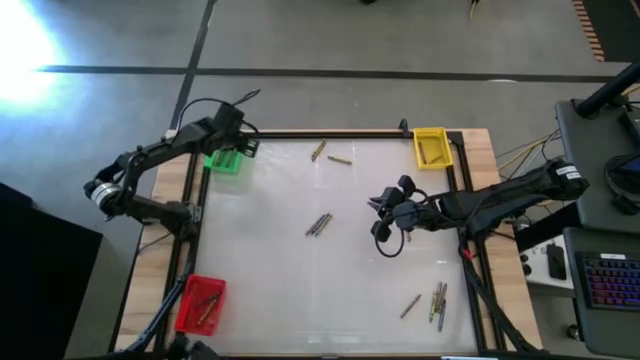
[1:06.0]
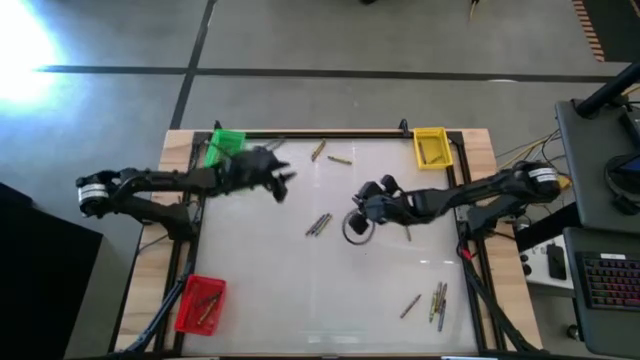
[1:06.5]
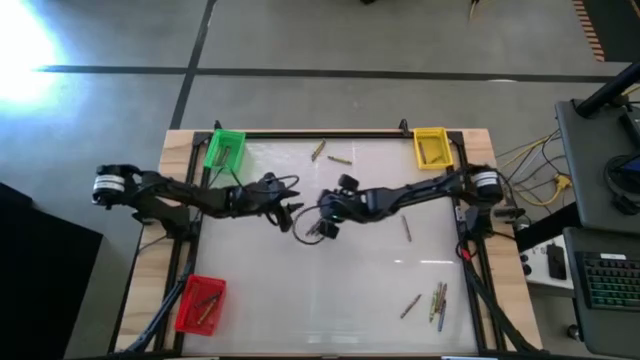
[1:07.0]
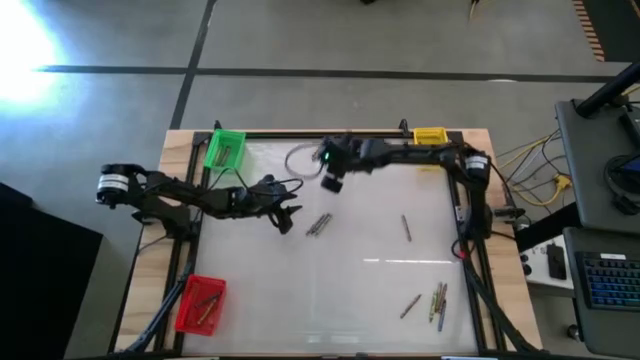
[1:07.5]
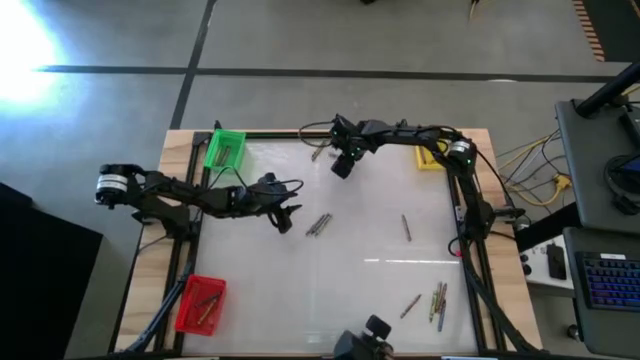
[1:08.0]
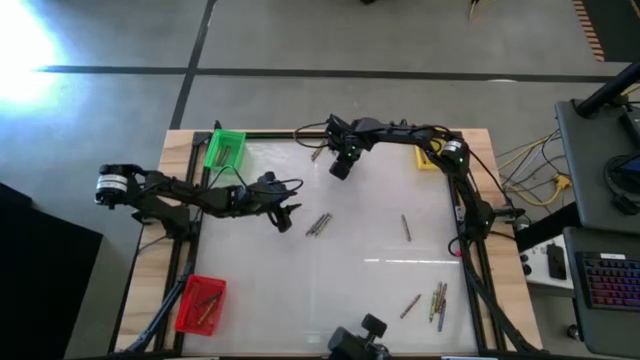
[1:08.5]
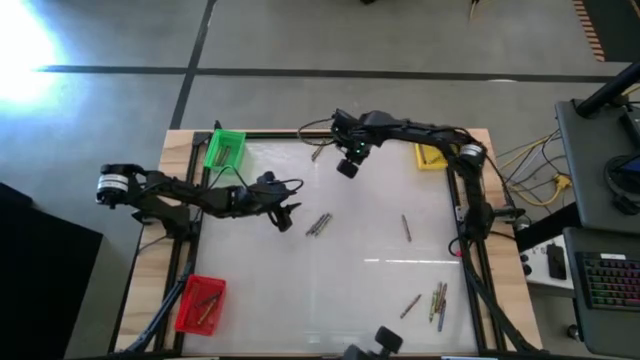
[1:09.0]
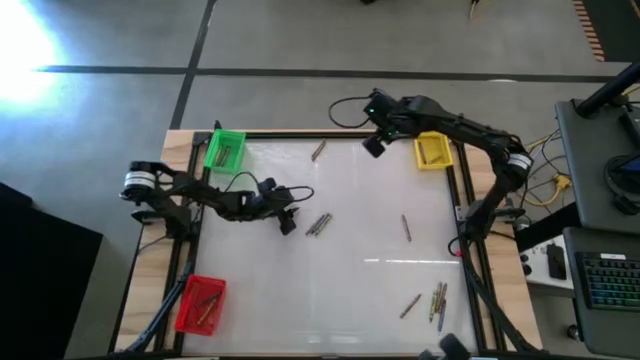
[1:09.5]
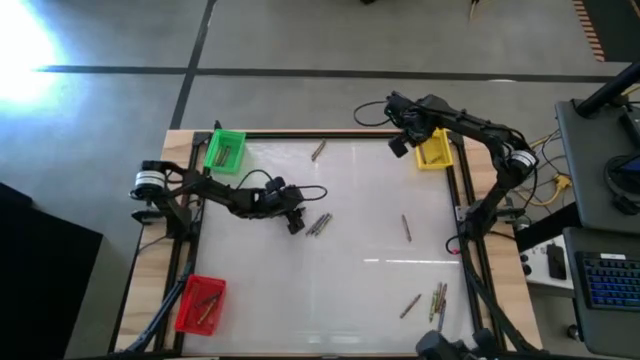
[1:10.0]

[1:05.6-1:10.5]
Task: Sort crayons
Put the green crayon into the yellow basket

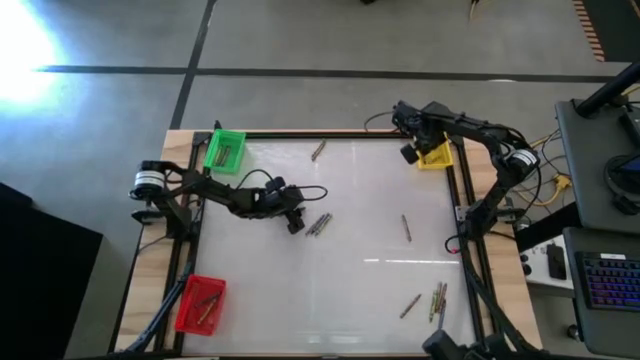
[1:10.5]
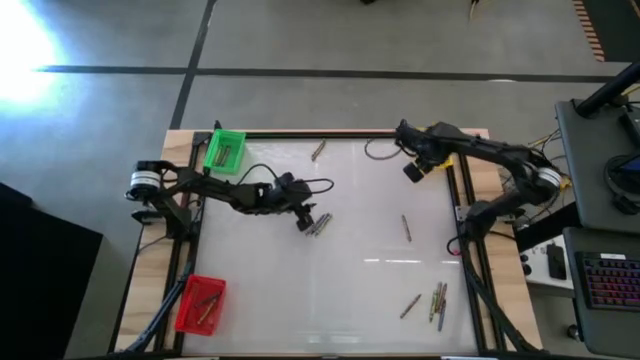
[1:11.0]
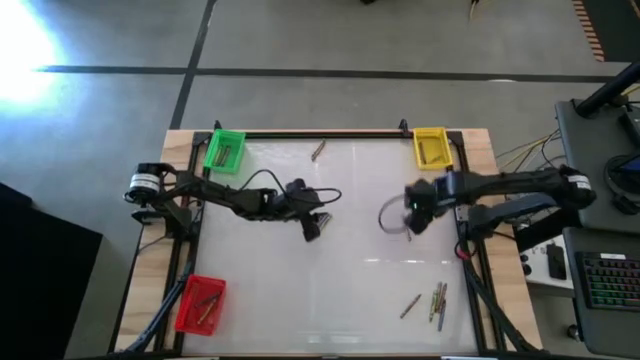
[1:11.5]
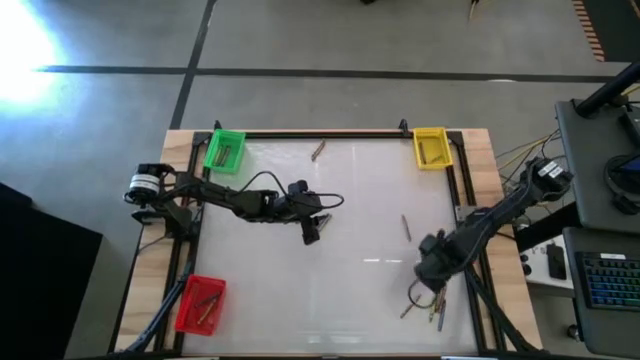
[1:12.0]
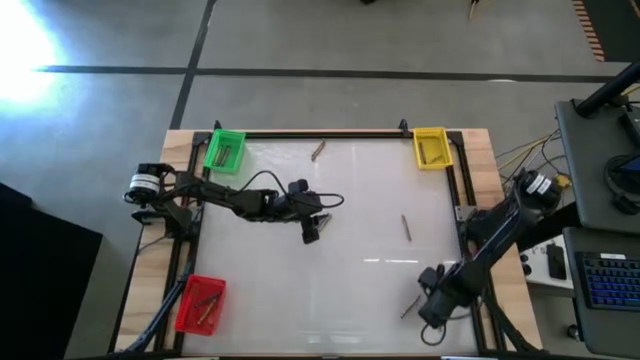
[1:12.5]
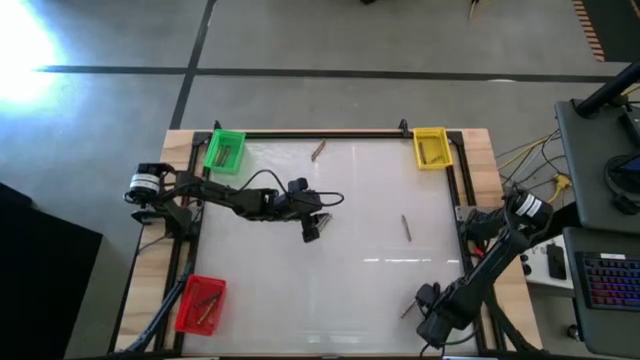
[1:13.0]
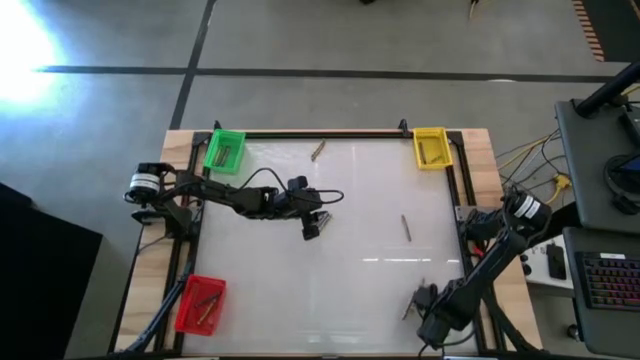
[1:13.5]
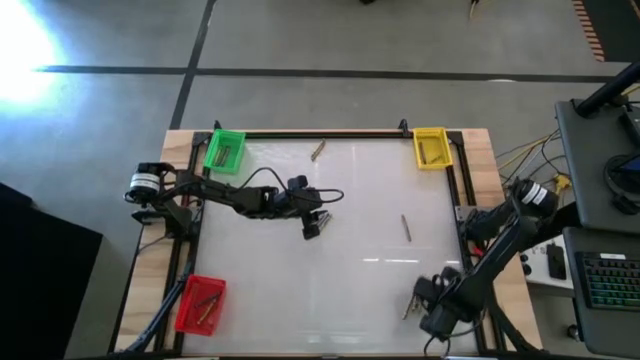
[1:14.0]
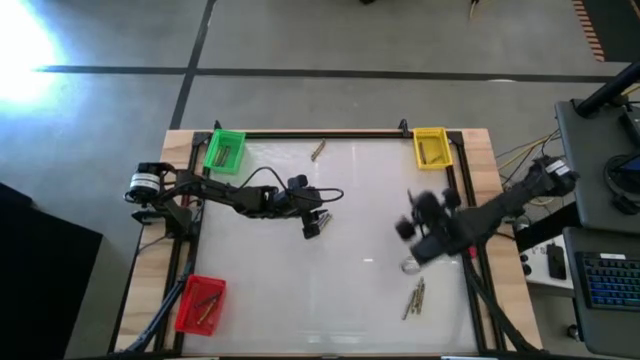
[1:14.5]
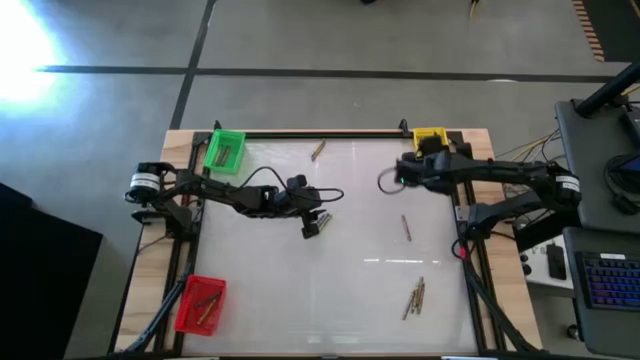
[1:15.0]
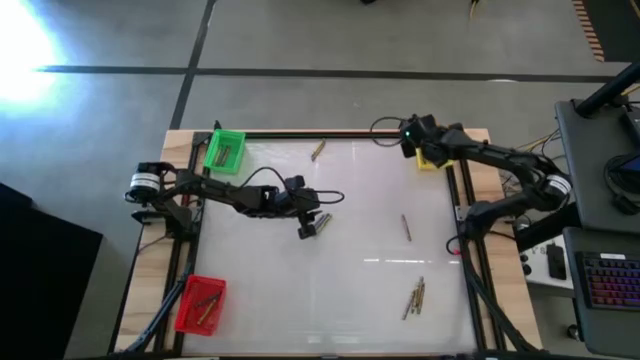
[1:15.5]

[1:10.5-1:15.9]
Put the blue crayon into the yellow basket

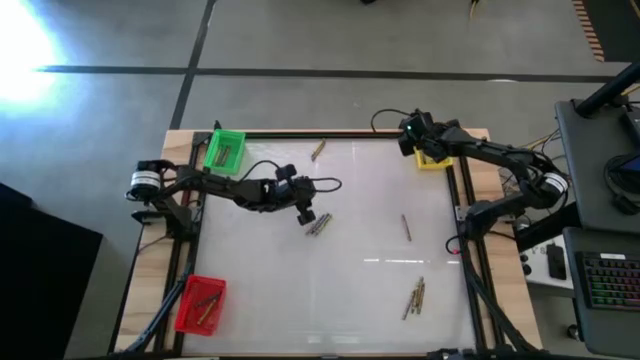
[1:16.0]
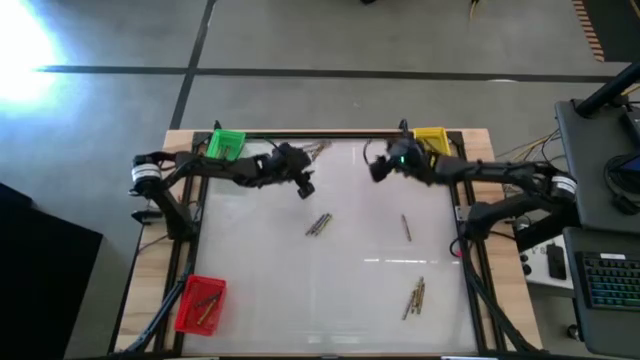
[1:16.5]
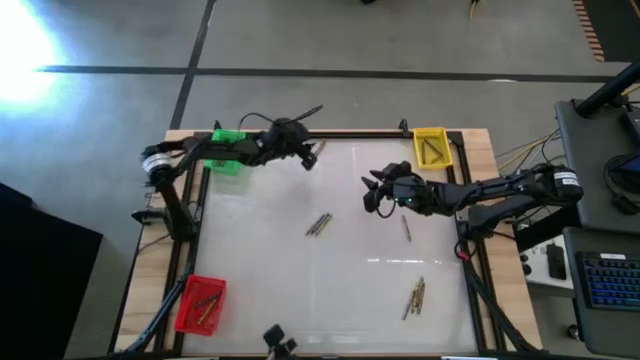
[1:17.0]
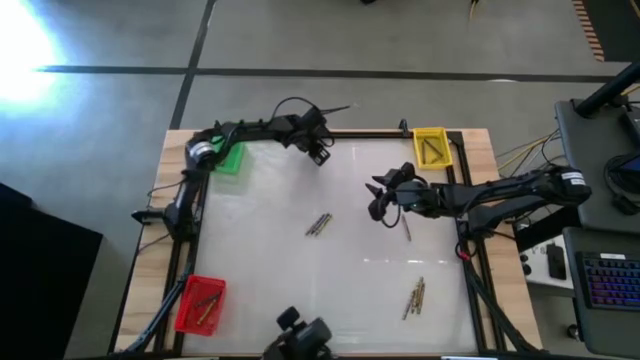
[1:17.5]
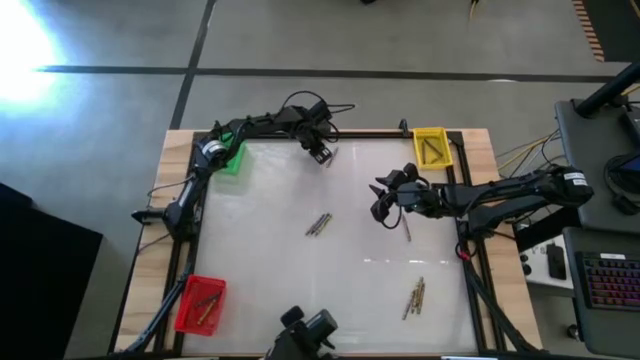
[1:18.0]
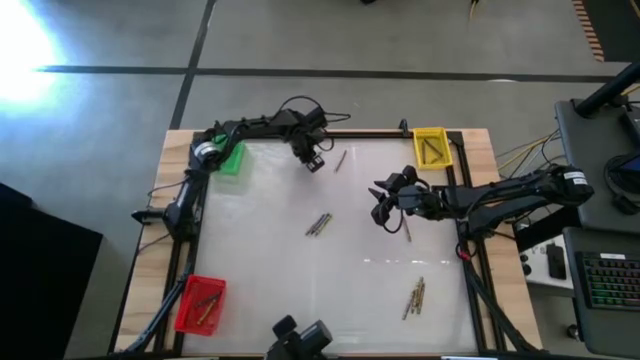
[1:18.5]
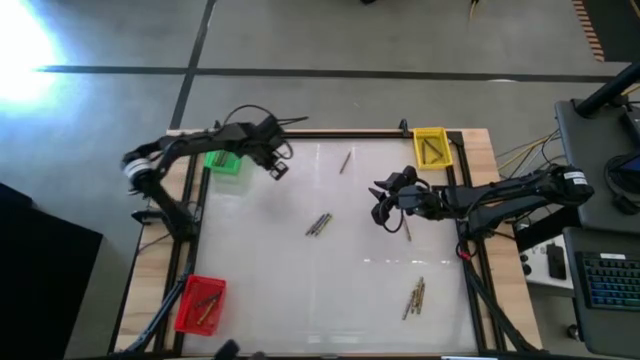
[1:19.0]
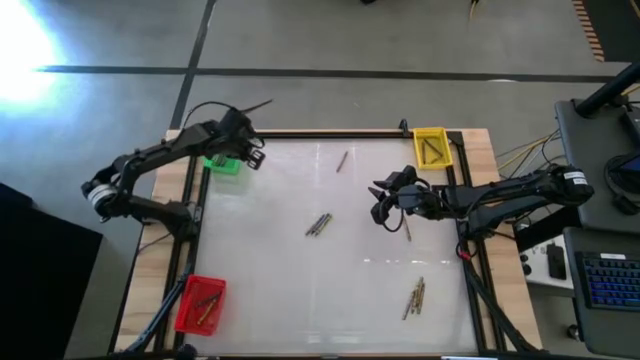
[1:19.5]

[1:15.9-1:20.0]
Put the green crayon into the green basket

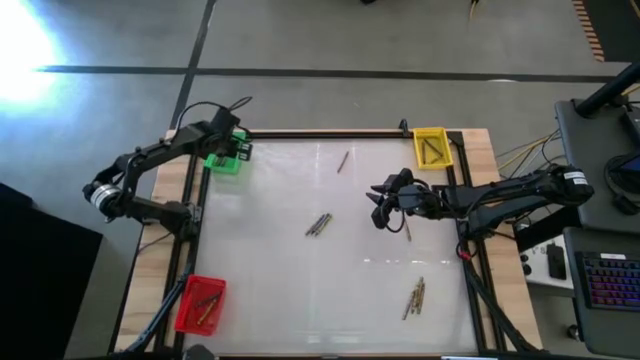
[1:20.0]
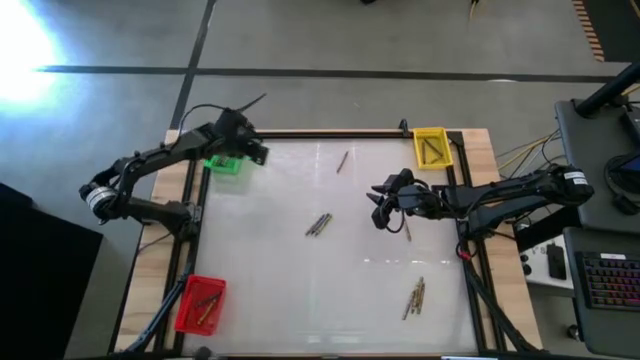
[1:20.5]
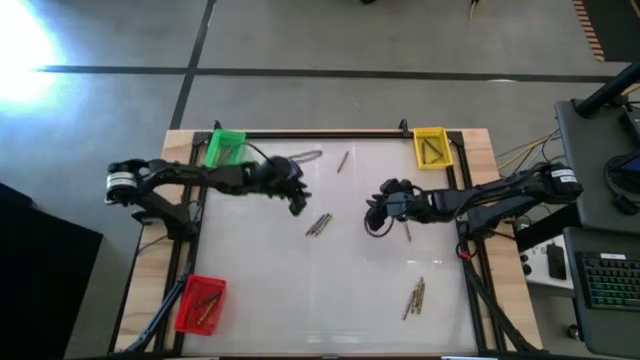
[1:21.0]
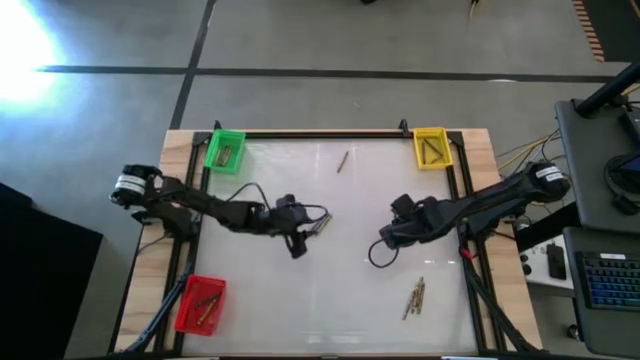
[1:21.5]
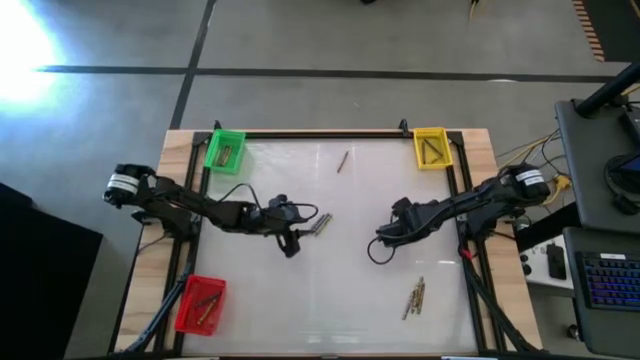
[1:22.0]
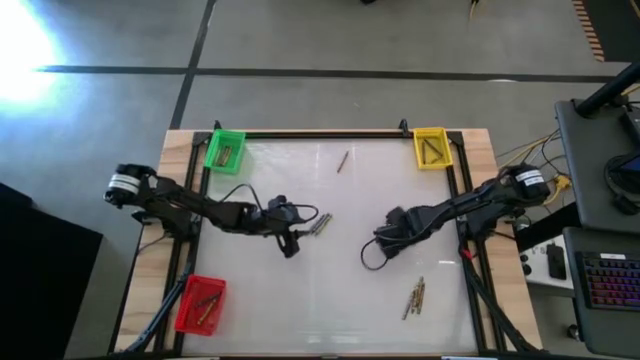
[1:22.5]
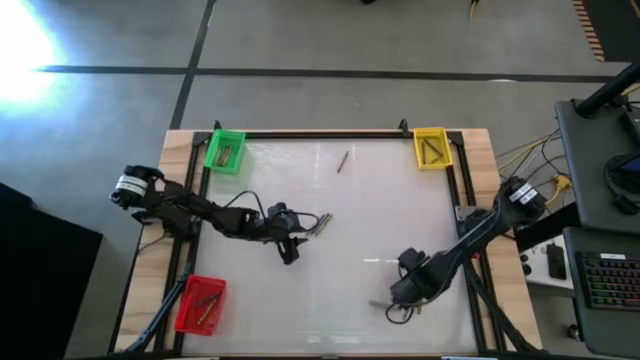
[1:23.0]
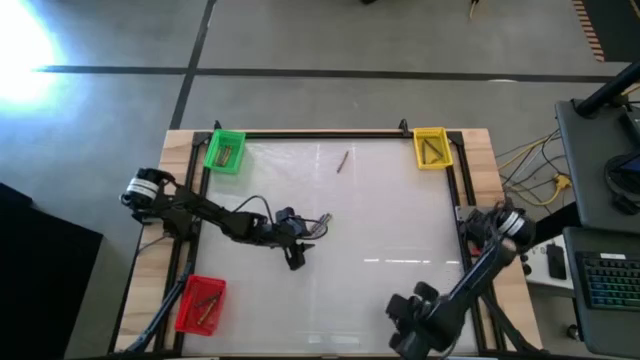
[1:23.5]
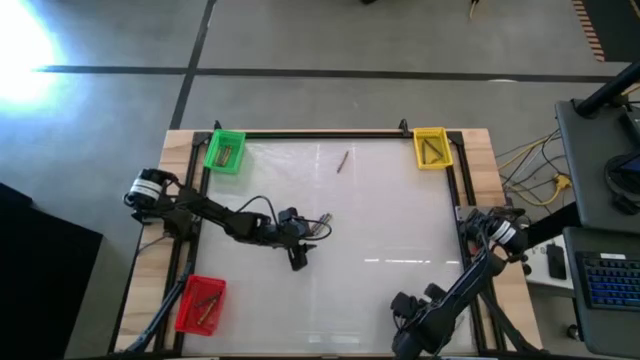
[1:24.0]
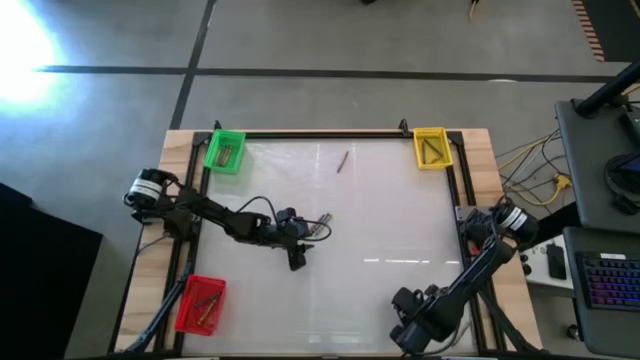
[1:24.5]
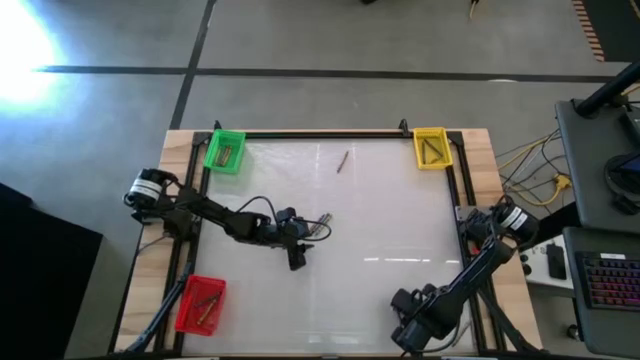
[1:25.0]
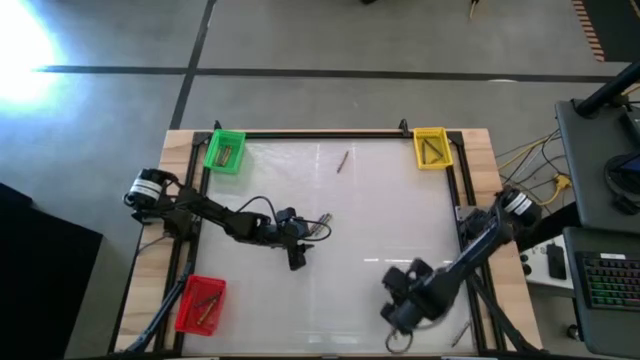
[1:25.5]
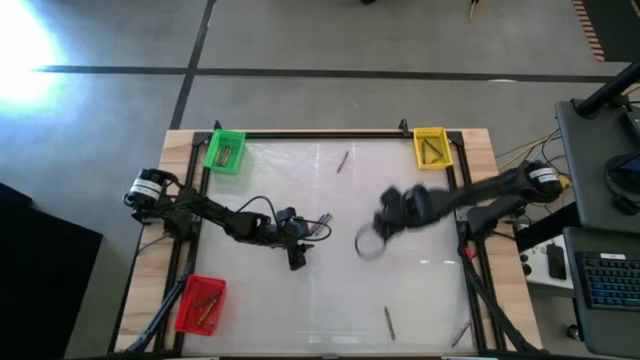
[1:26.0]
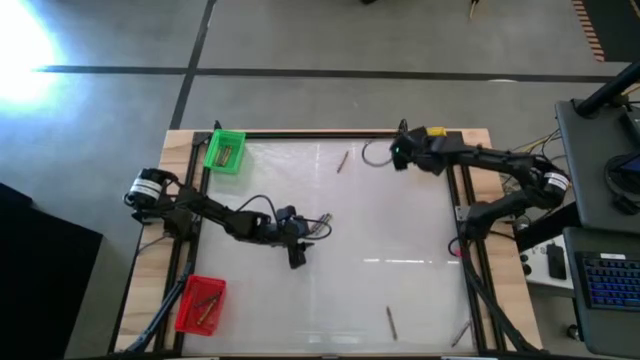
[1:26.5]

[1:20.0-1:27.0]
Put the green crayon into the yellow basket

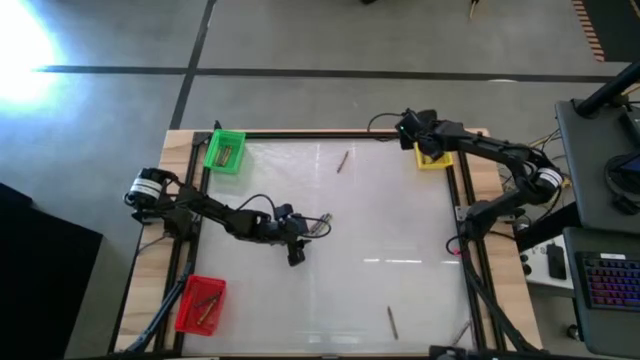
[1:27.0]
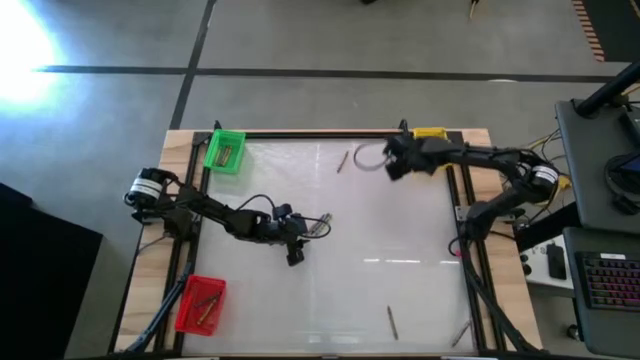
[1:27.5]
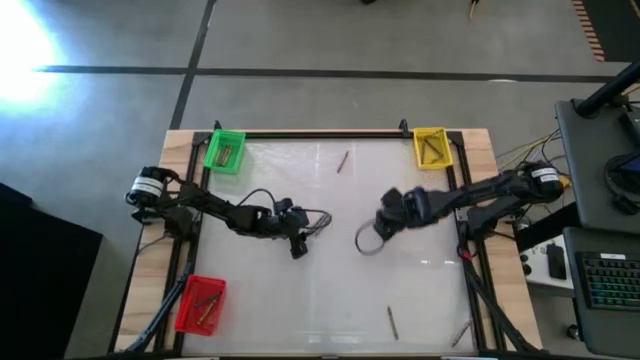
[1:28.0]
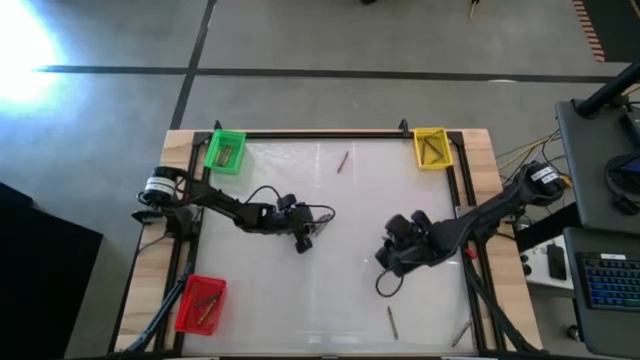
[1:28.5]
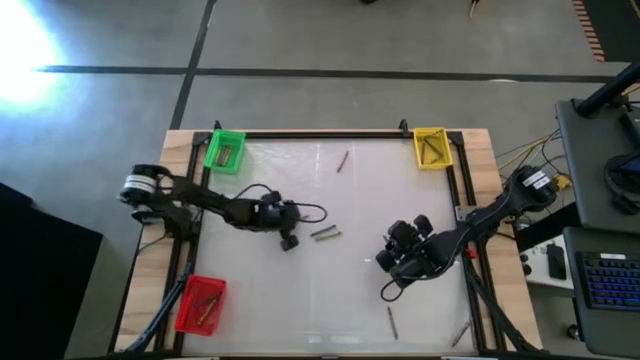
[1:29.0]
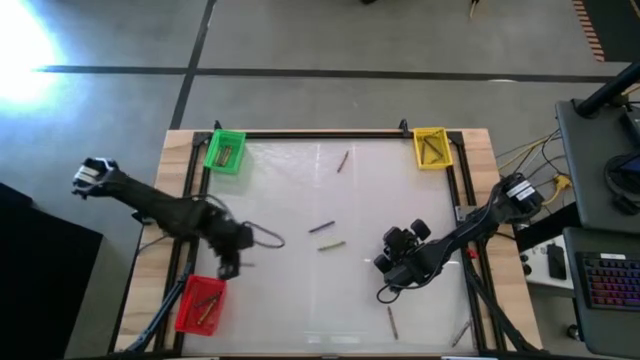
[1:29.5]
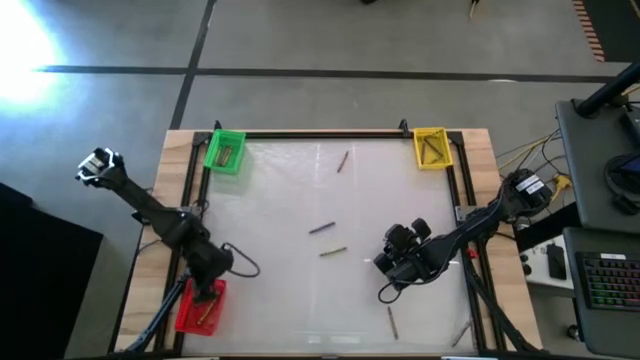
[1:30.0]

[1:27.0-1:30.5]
Put the brown crayon into the red basket
